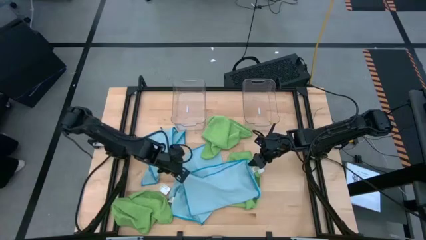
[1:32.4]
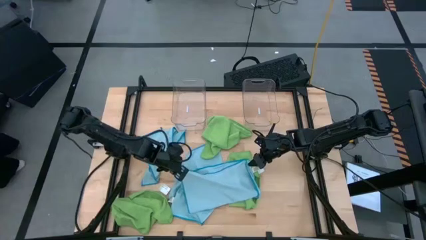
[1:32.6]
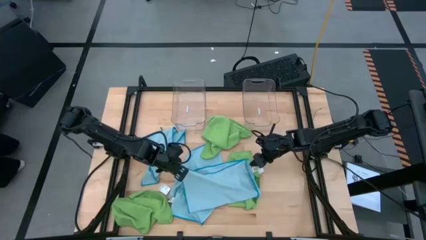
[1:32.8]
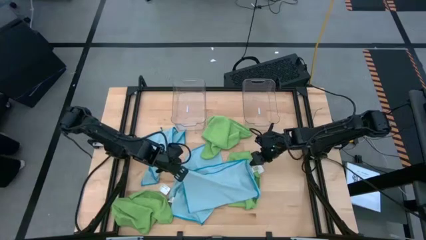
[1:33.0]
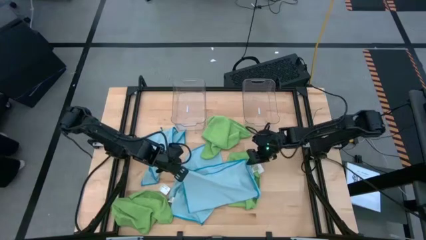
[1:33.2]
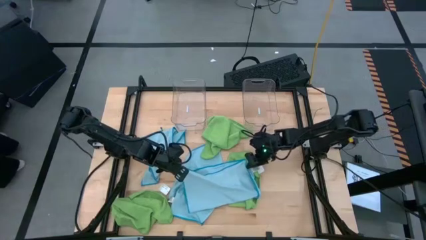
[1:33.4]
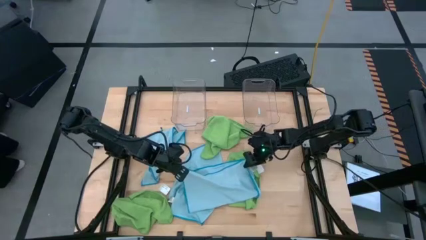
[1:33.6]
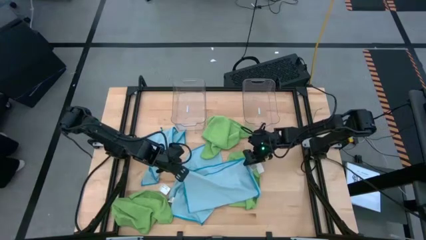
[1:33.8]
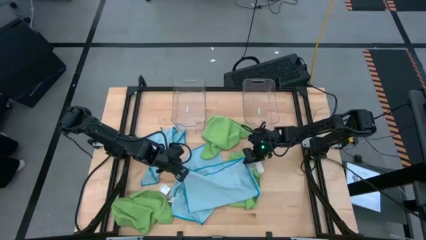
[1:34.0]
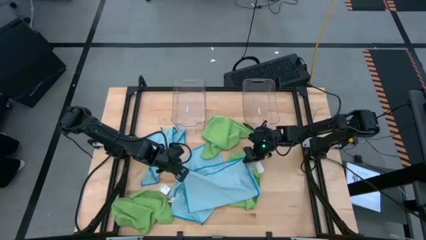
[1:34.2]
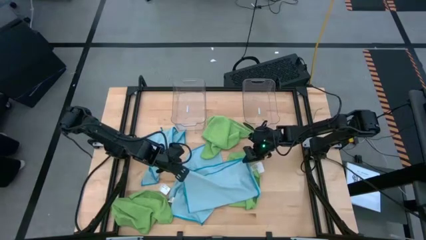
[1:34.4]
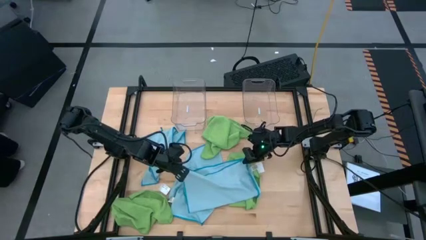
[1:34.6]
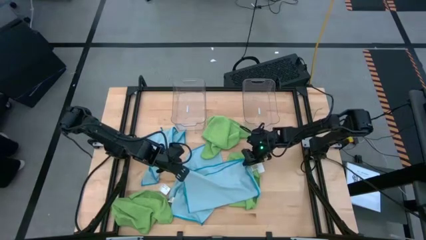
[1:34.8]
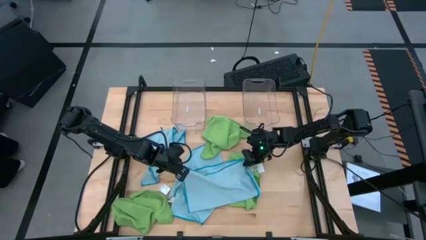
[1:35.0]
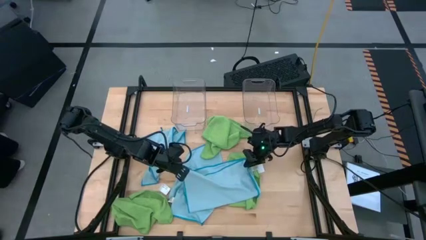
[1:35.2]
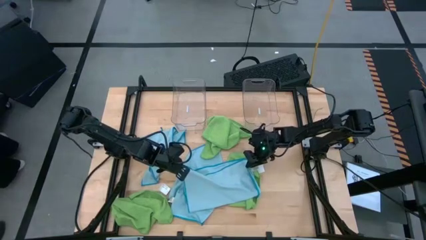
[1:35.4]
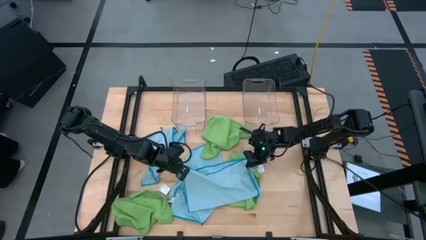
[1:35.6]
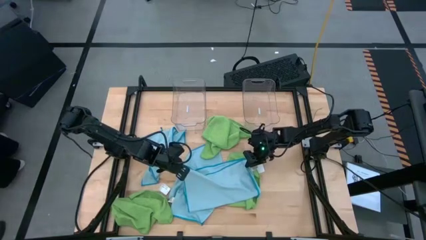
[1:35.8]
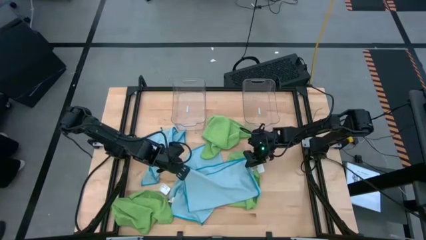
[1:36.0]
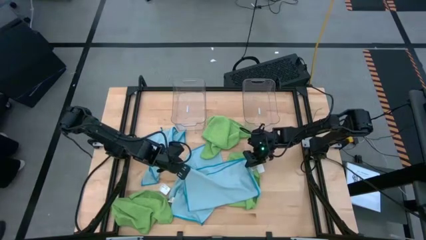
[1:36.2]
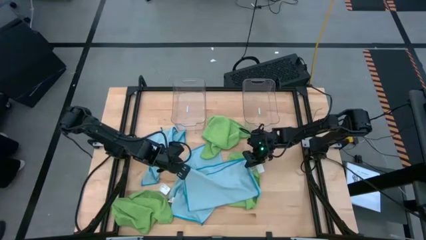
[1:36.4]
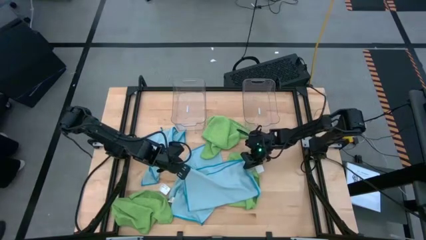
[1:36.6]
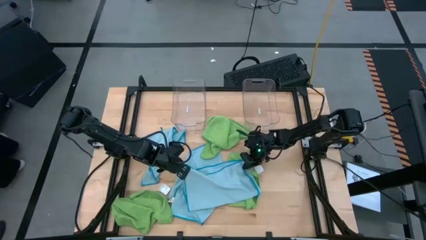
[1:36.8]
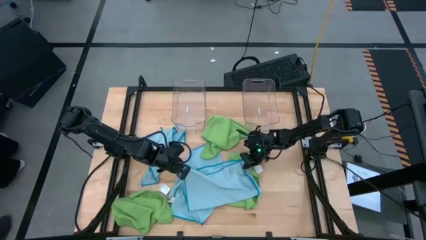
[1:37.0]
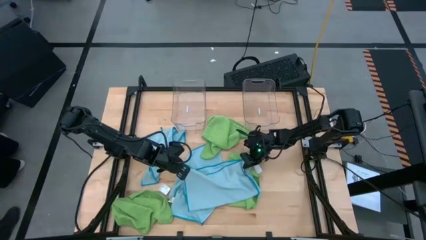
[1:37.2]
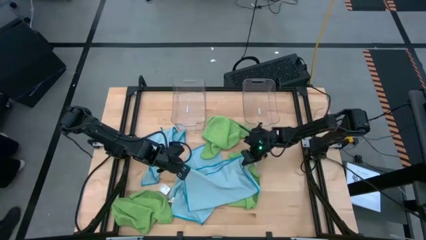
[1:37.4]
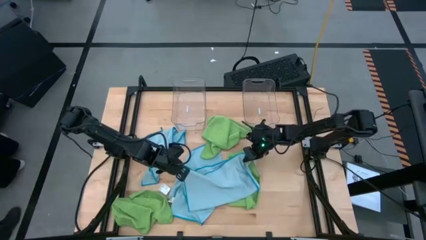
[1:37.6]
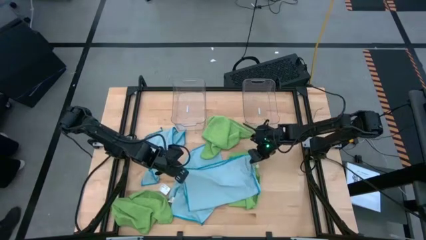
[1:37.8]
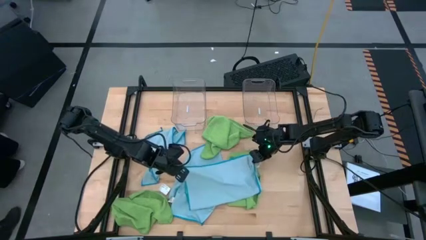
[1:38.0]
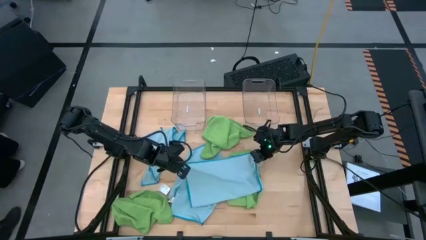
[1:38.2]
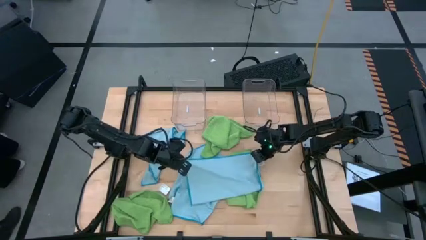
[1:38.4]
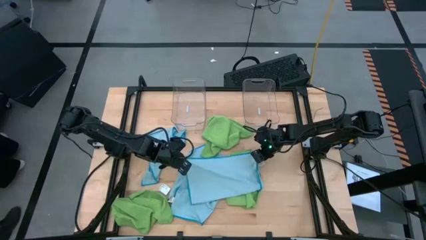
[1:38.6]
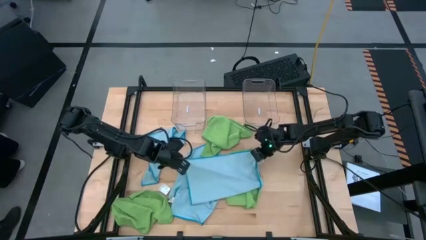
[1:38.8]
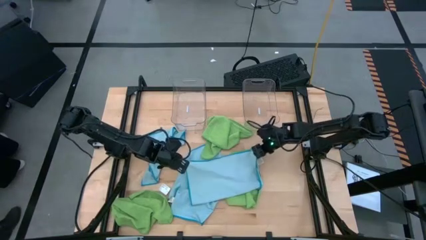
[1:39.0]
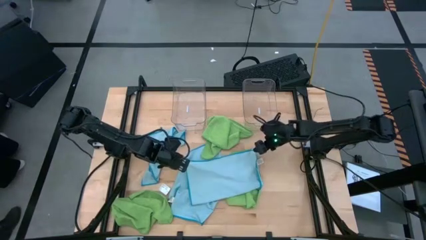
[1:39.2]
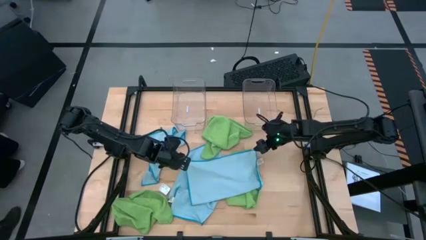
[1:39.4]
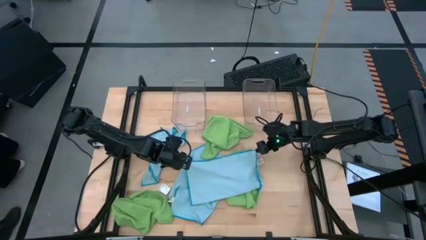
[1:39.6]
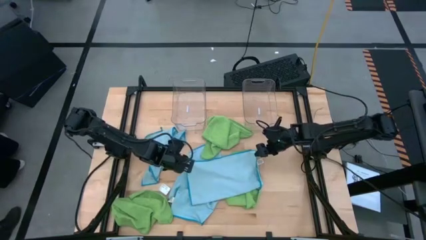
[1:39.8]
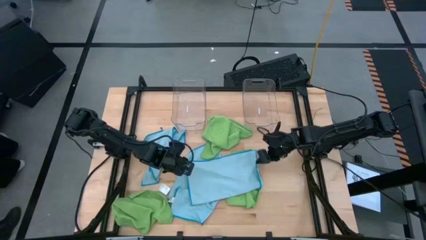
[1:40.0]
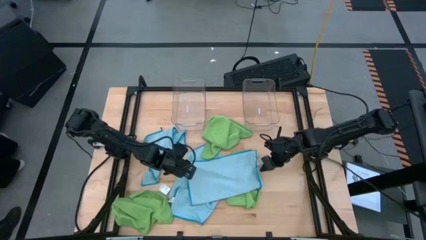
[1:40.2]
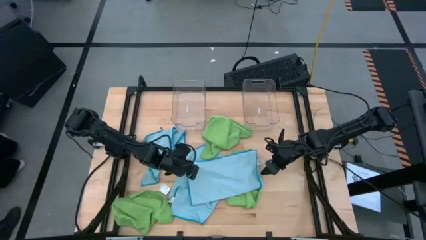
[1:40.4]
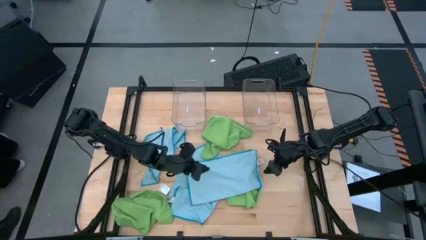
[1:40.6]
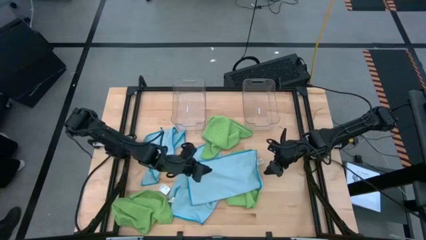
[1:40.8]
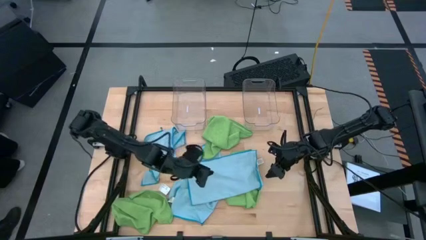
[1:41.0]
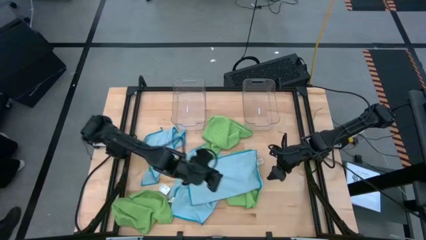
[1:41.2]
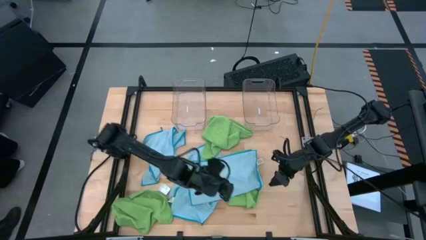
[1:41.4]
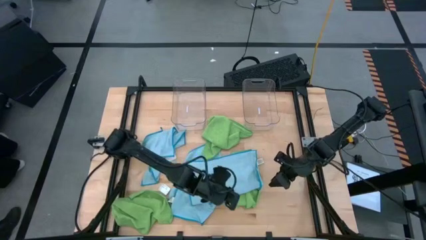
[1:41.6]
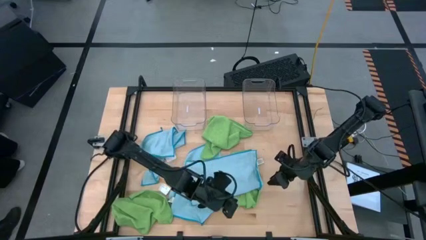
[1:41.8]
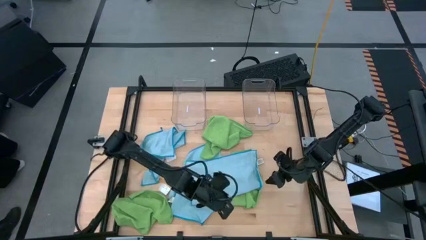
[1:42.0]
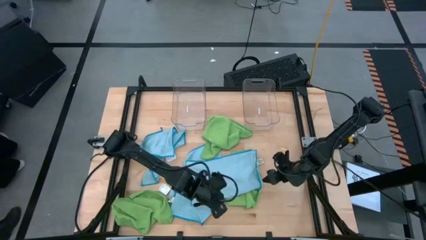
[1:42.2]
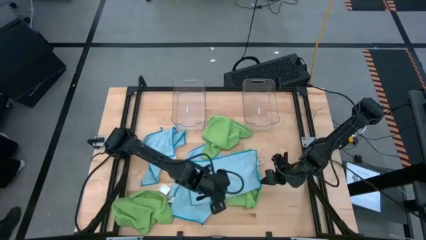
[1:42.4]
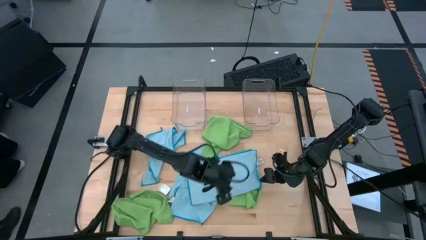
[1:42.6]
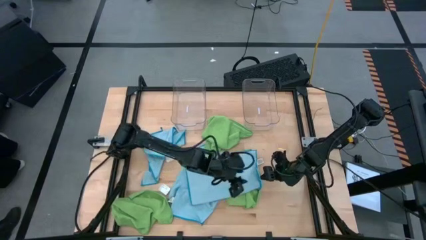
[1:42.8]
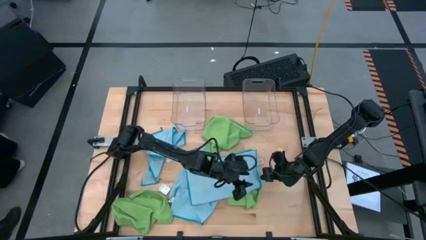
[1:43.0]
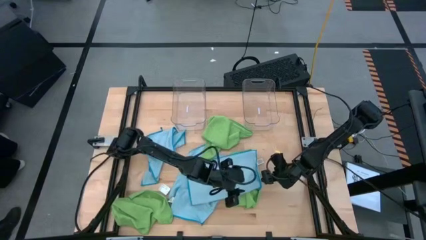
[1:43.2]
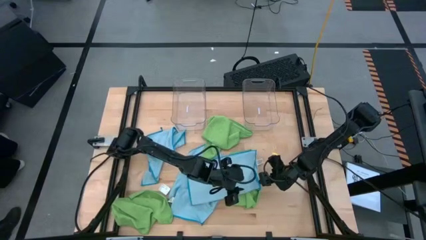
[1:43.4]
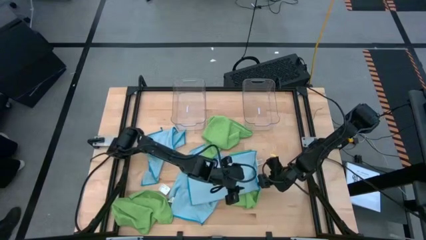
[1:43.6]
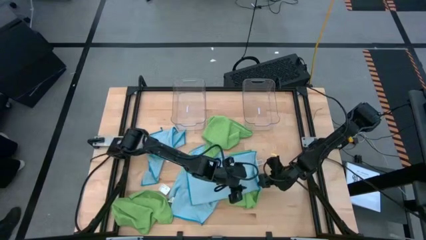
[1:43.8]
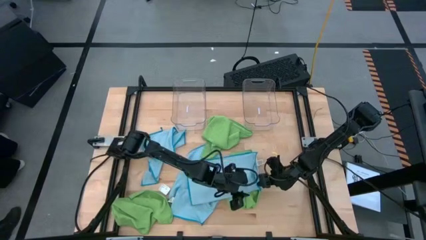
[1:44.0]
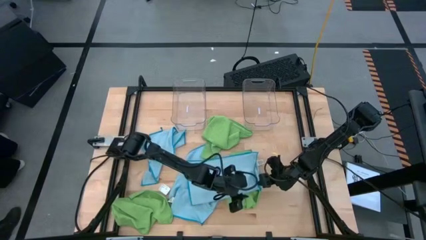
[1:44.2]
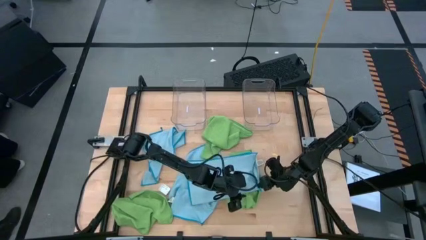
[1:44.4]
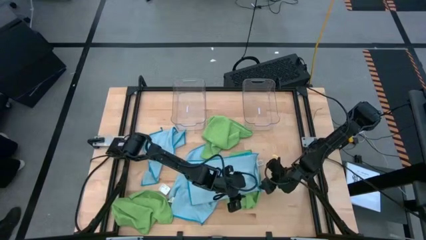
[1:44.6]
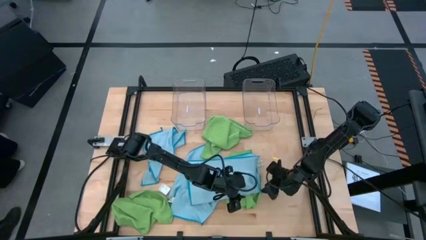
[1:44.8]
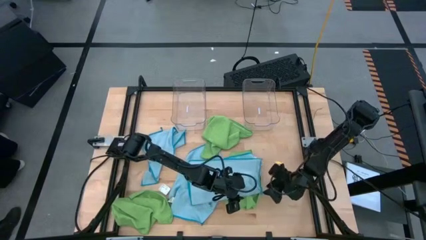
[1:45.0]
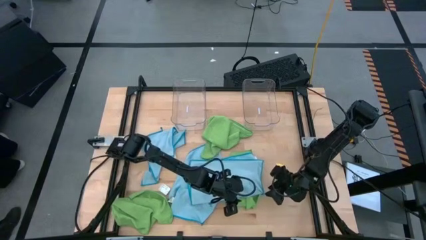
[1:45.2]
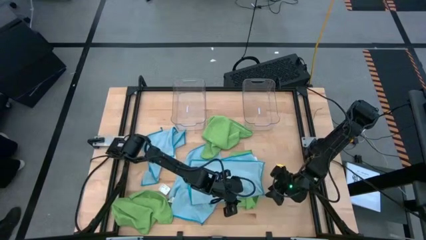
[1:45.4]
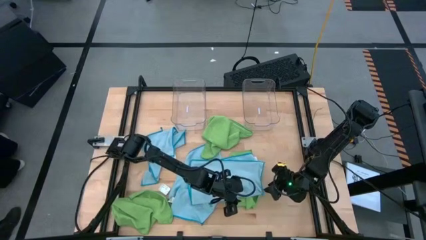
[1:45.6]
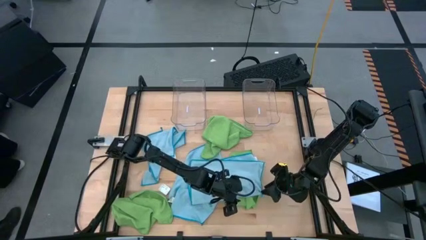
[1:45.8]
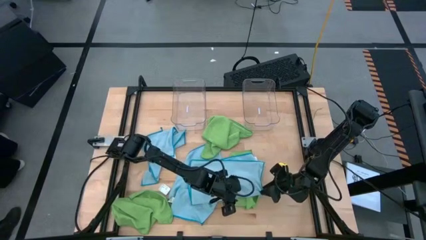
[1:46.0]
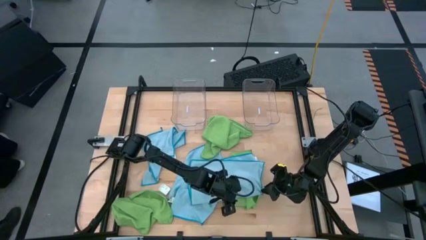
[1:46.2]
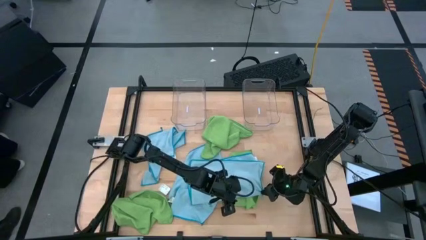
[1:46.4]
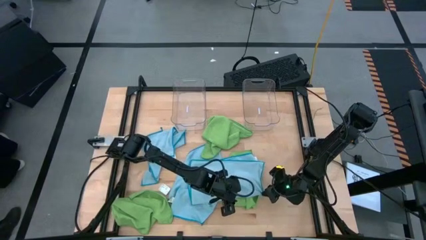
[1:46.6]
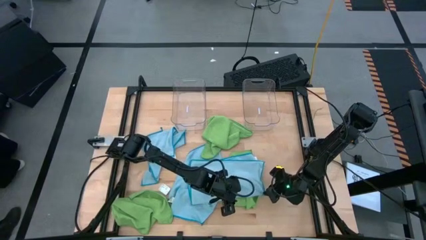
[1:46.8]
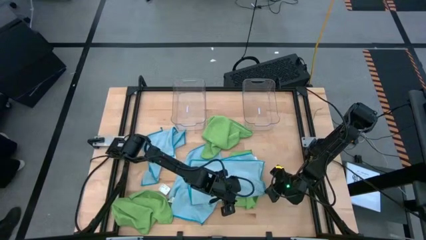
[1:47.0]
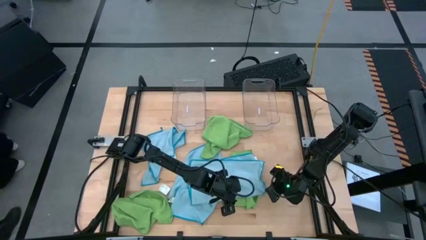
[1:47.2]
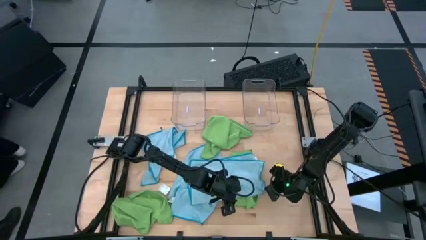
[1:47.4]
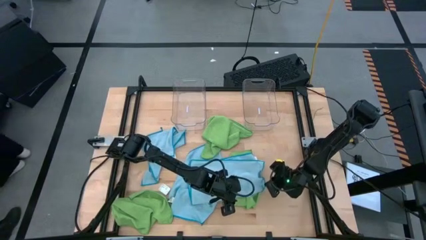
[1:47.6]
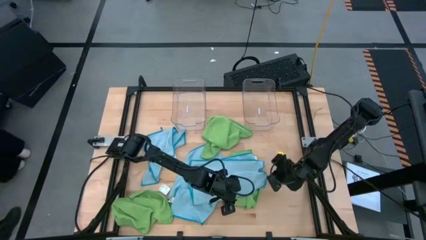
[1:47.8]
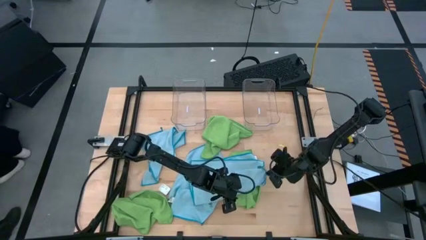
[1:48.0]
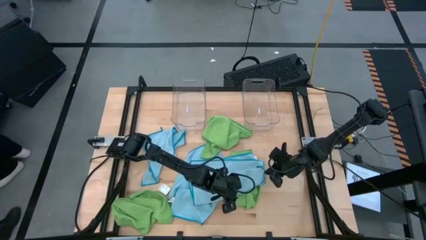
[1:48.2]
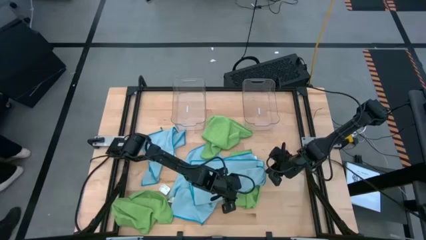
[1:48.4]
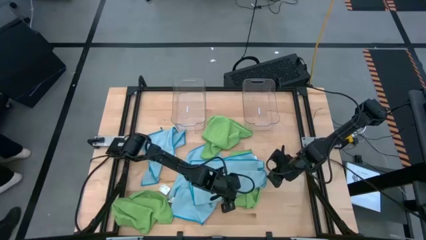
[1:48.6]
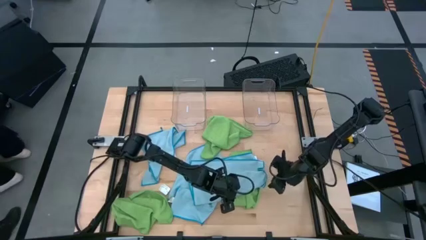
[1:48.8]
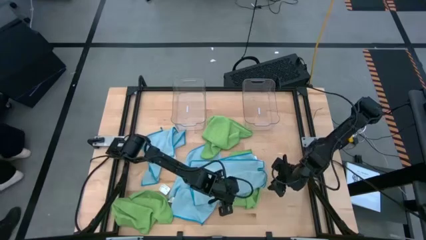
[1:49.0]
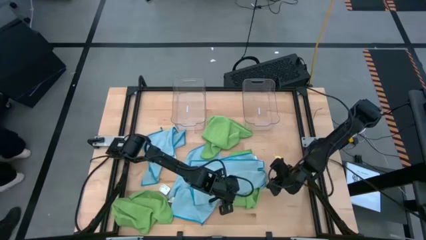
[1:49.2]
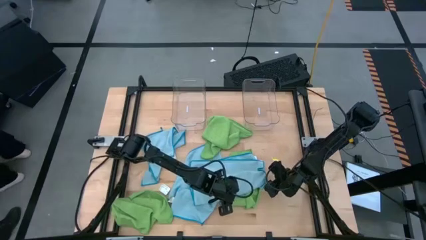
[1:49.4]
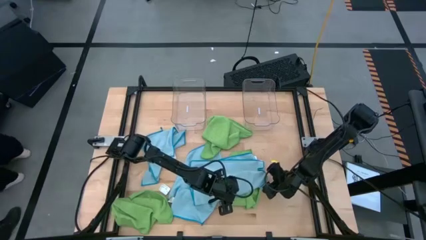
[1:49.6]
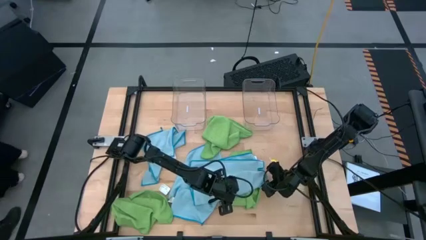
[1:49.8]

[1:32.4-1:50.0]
Task: Fold microfiber towels
Fold the right blue microfiber towel
